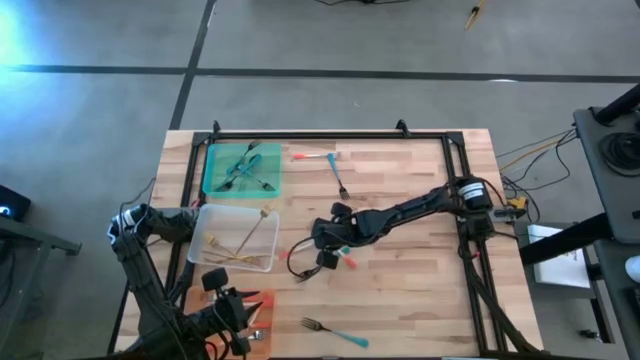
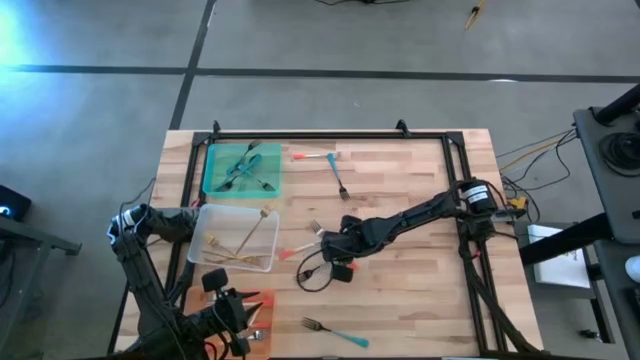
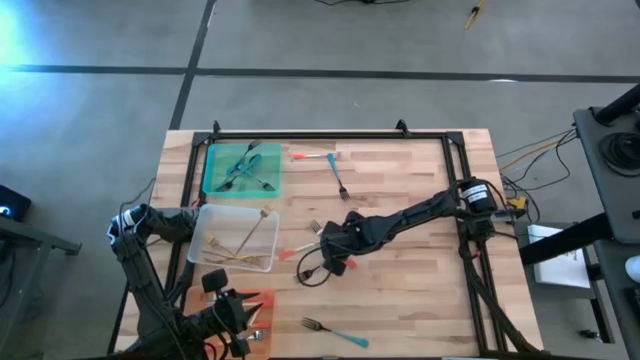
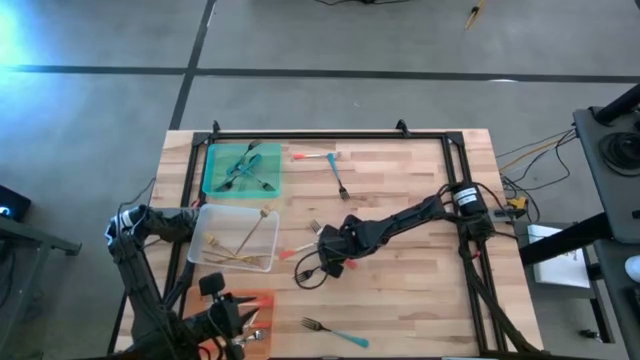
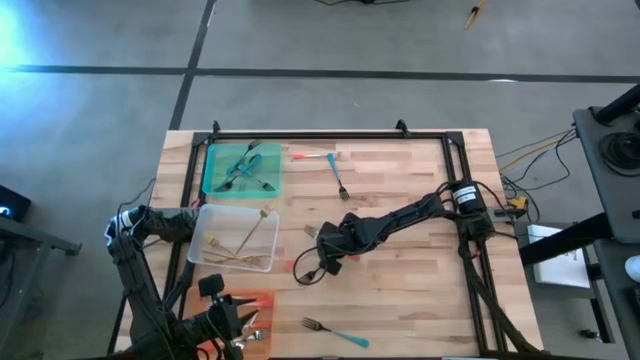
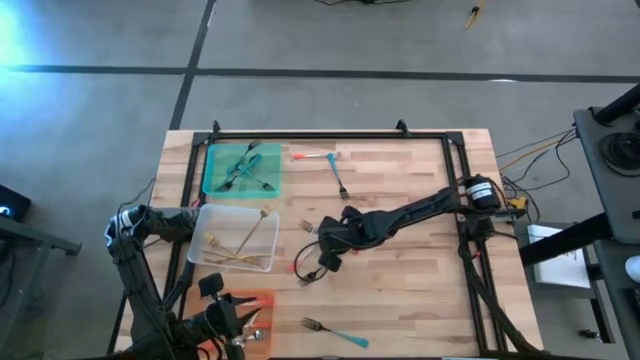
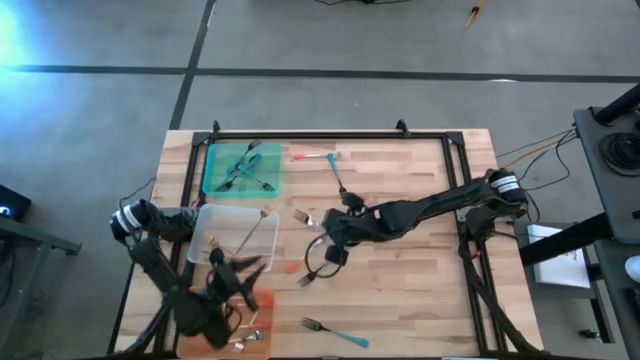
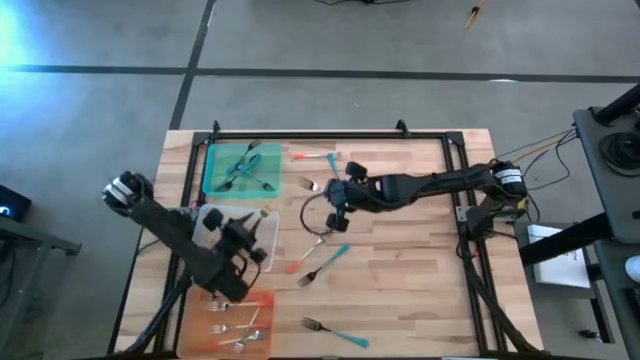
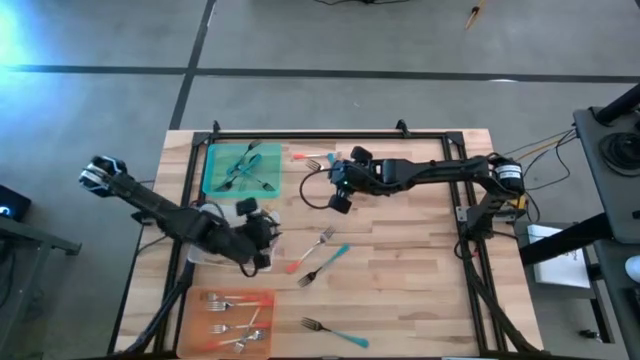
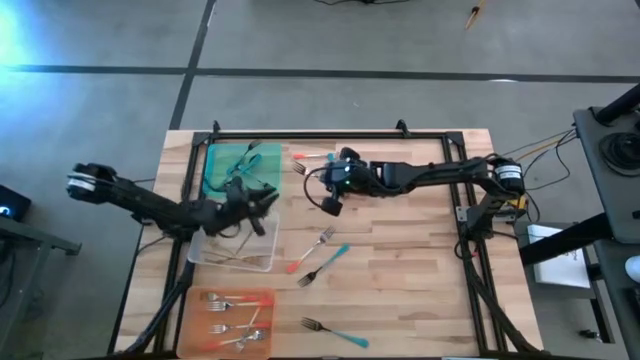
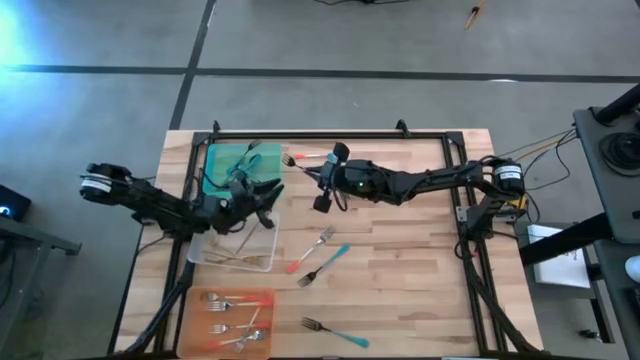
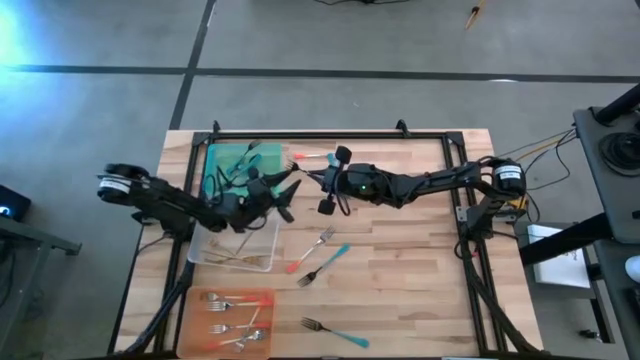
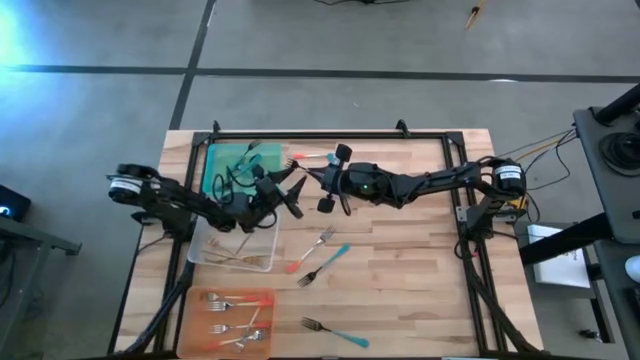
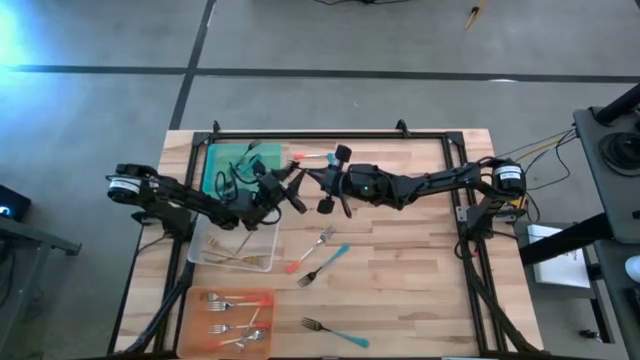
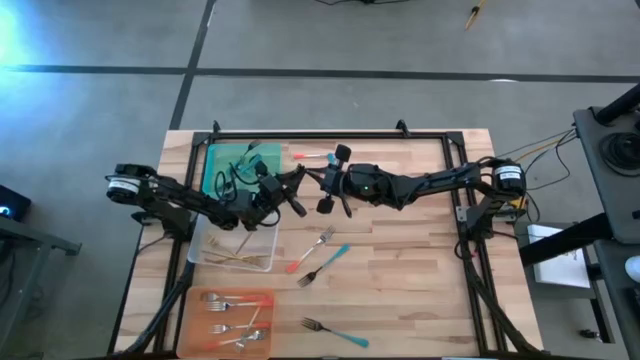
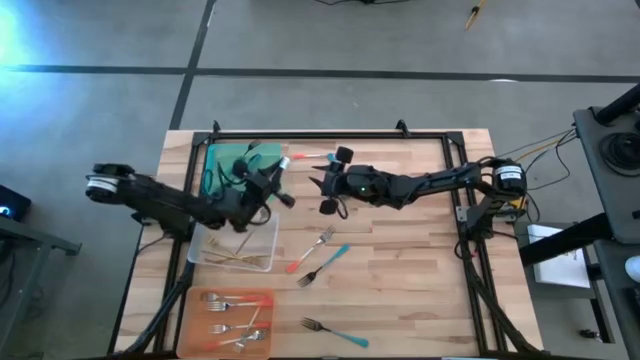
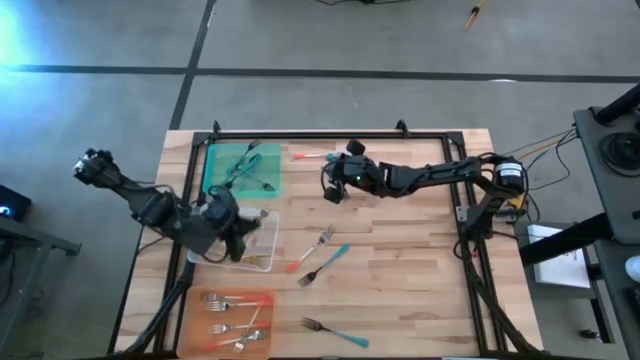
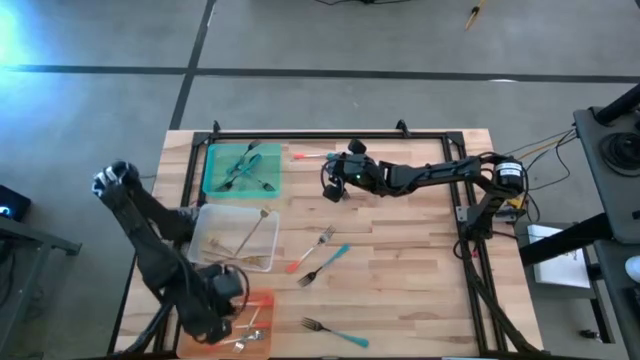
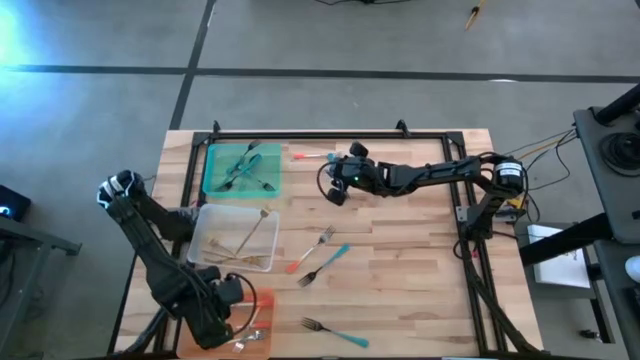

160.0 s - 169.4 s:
Task: Sort silverware by color (type)
Put the orange fork into the orange bin

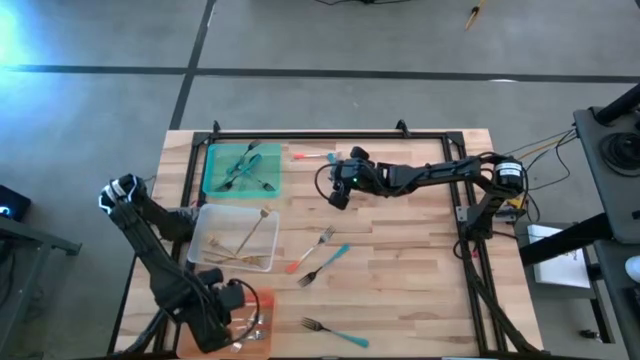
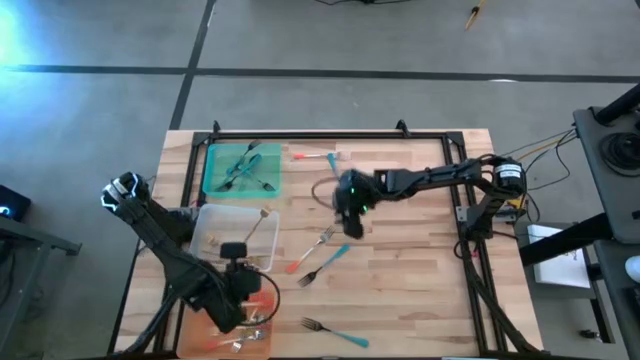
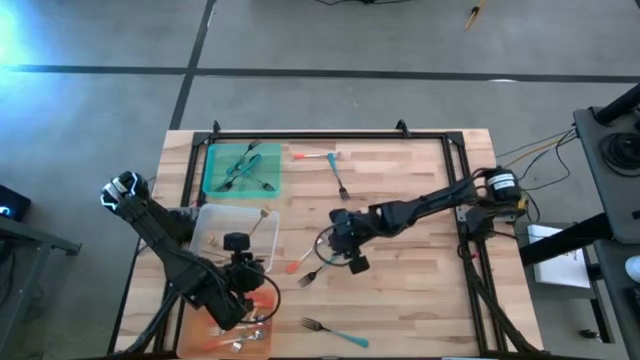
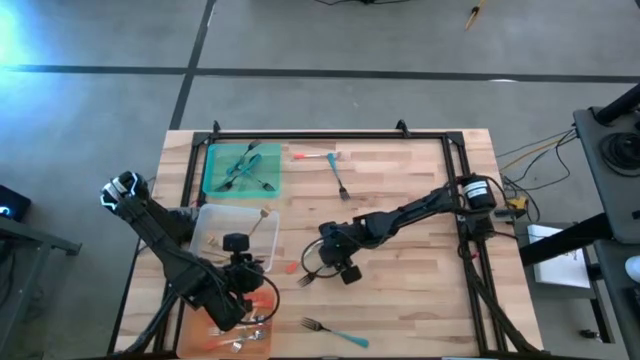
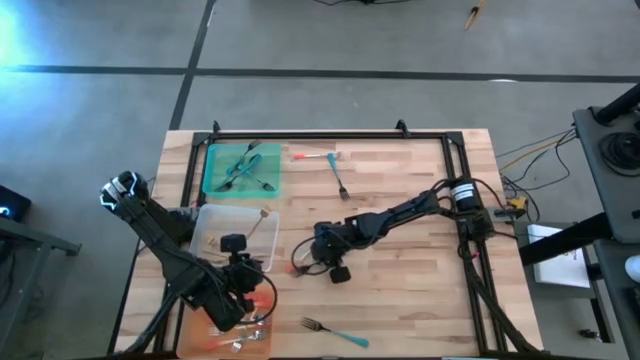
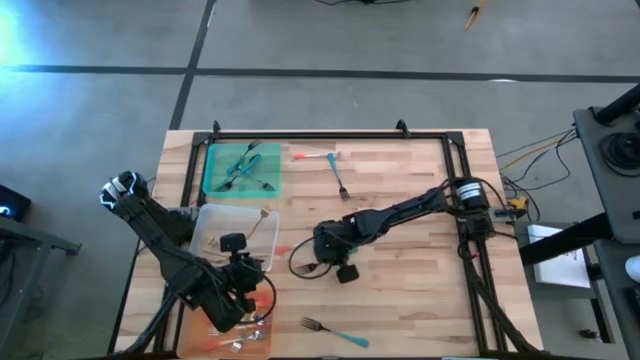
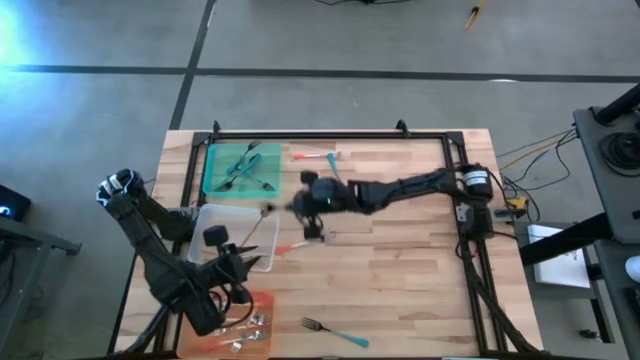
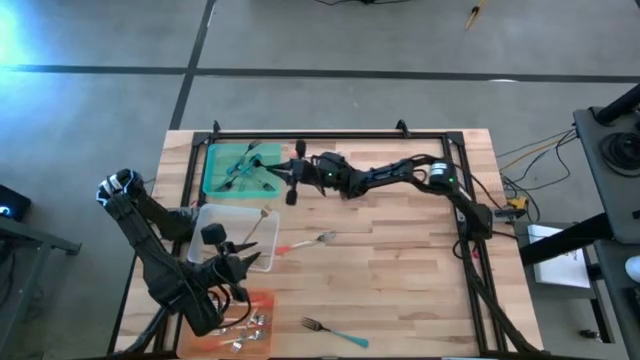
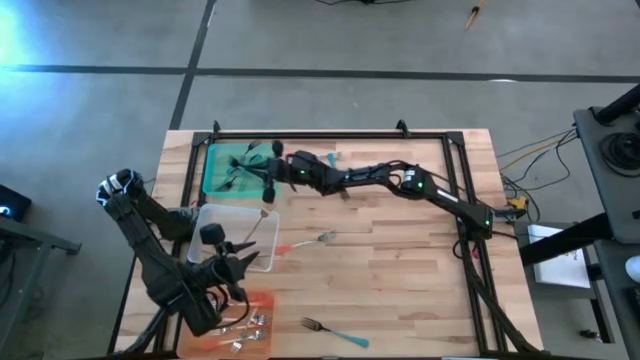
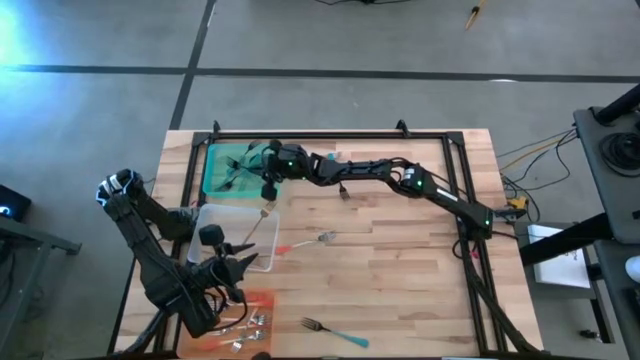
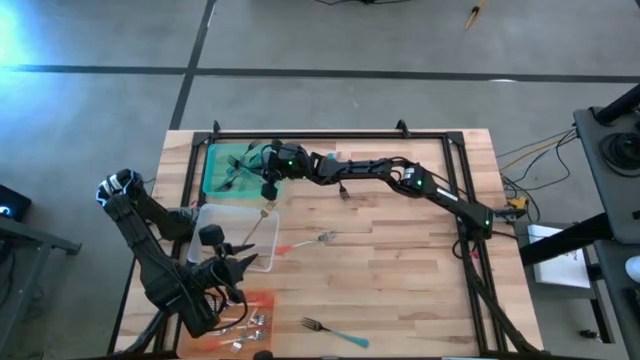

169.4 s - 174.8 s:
Put the blue fork into the blue bin

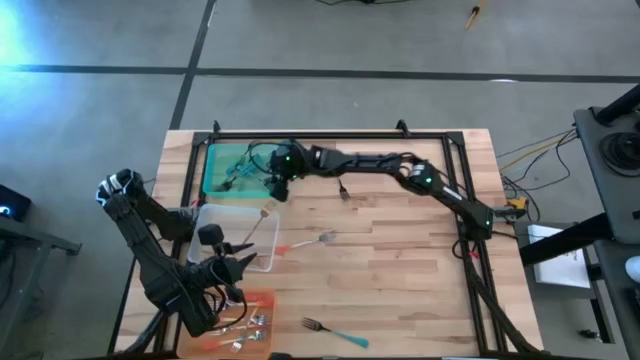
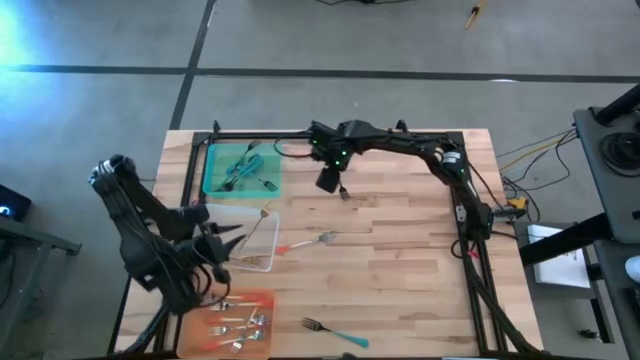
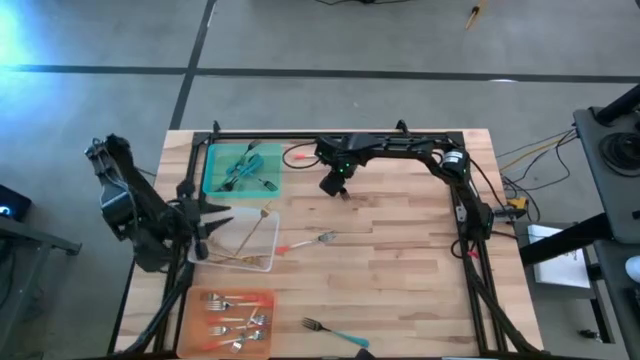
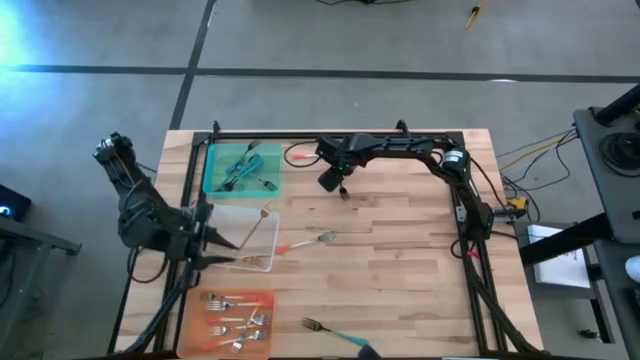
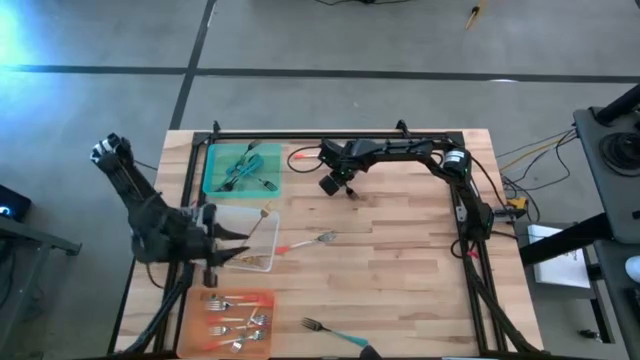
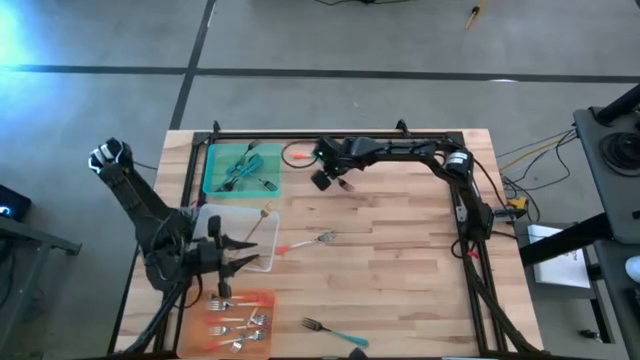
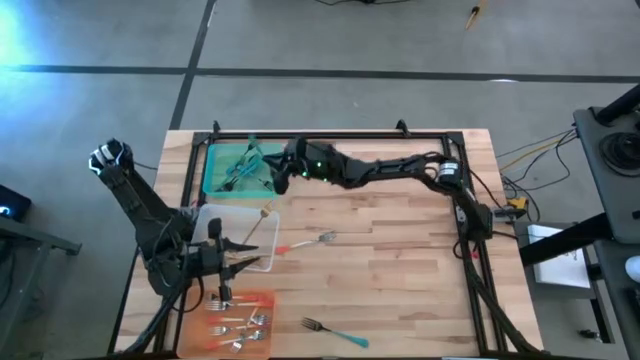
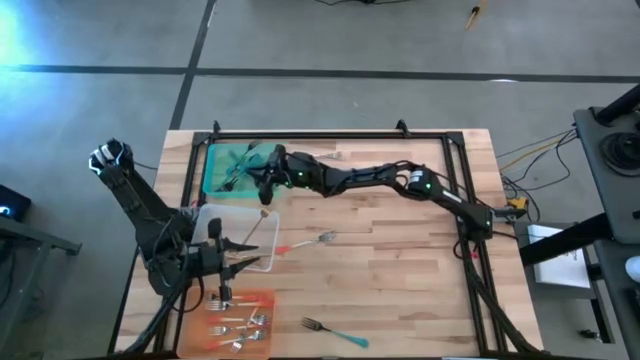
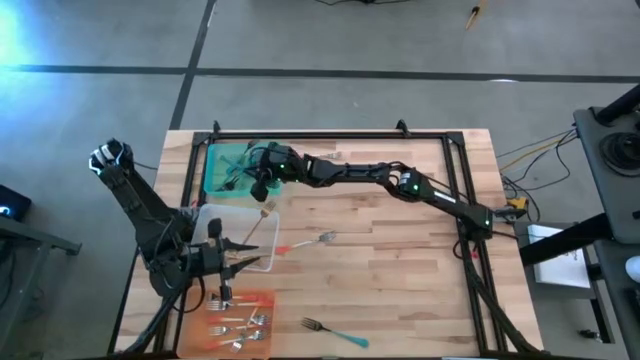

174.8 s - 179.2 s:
Put the blue fork into the blue bin

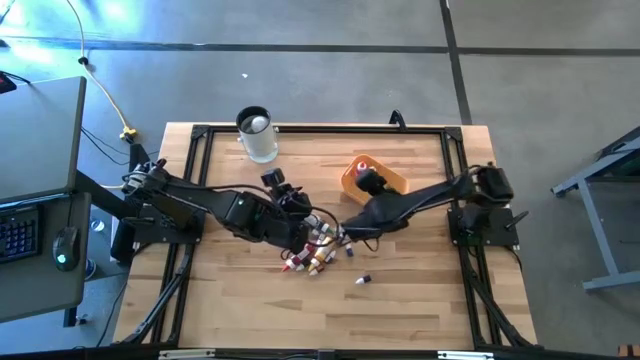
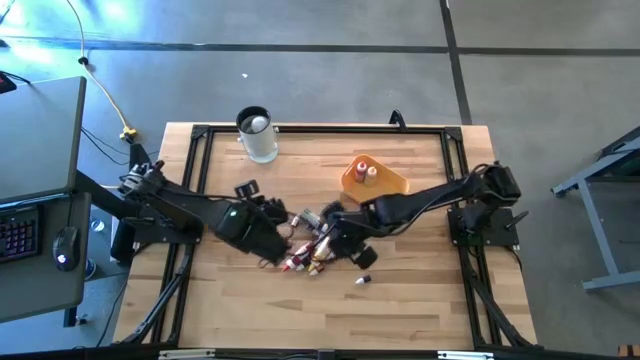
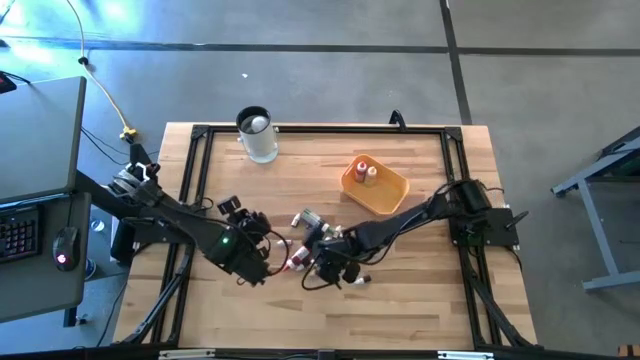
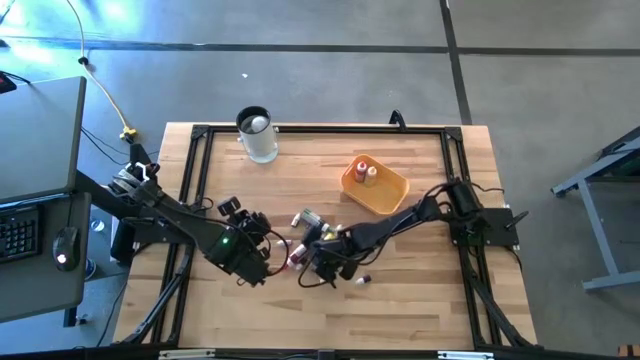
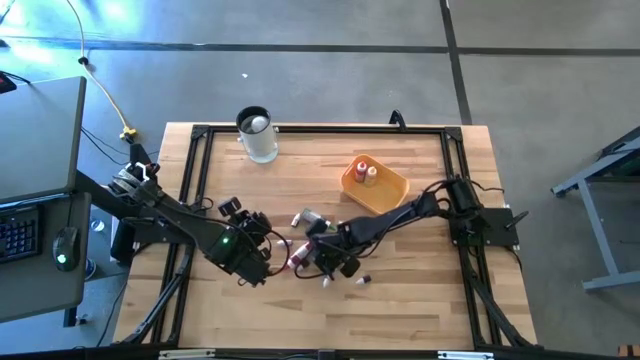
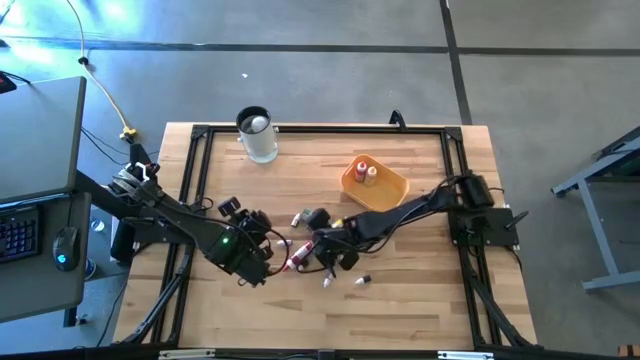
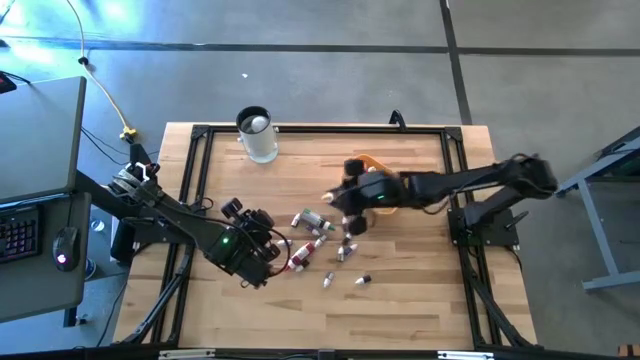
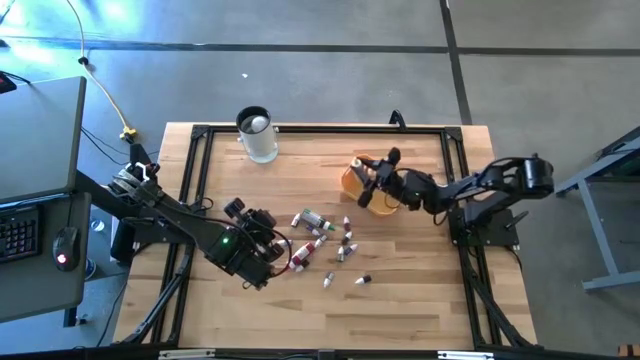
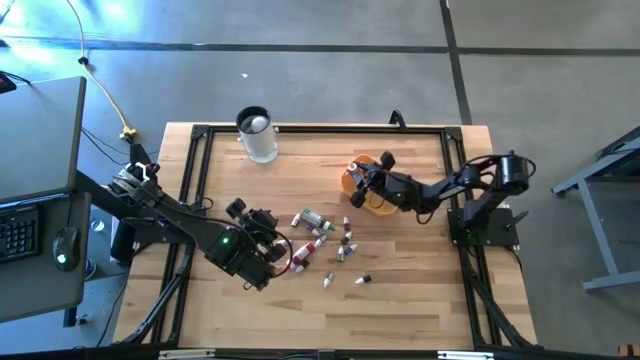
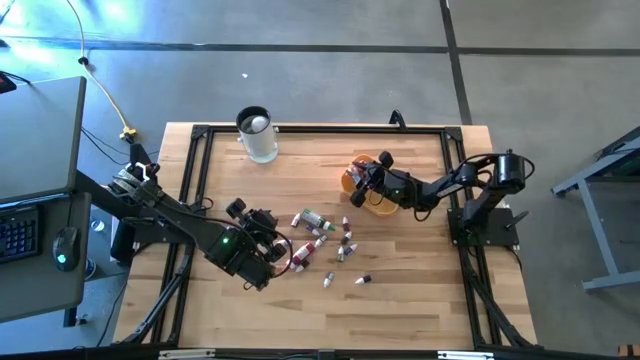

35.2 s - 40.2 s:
Task: Pick & Place food coloring
Put the large yellow food coloring bottle into the yellow bin
